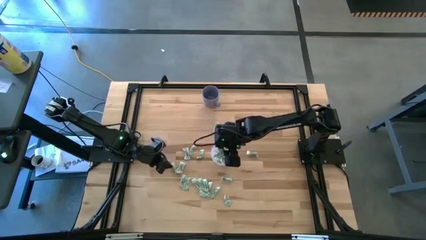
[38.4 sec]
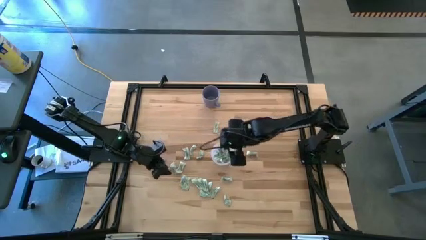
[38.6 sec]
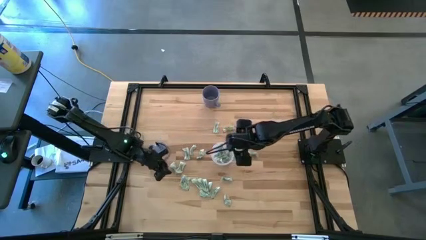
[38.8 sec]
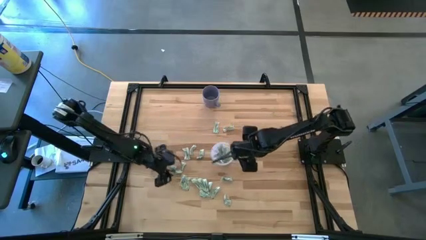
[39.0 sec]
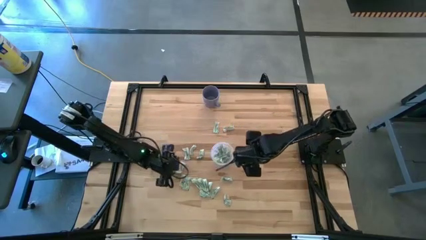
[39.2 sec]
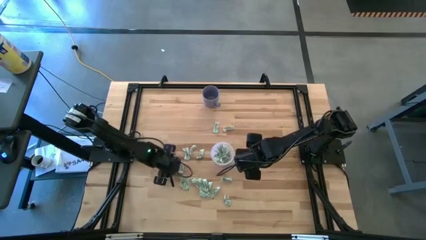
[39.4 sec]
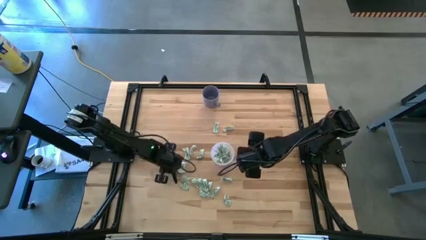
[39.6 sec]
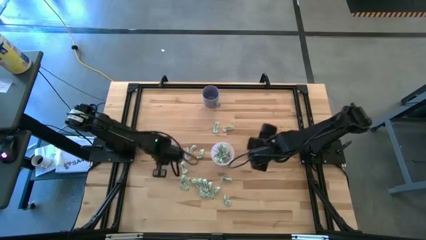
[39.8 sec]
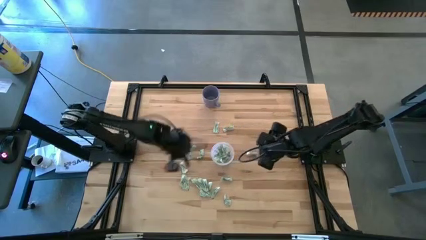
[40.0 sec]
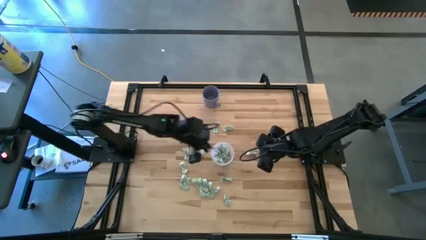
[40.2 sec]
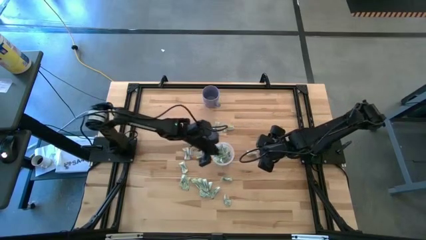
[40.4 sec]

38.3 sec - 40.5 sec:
Task: Pick and place Stevia / Truvia into bins
Put the stevia packet into the transparent container

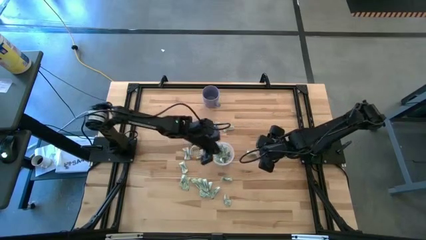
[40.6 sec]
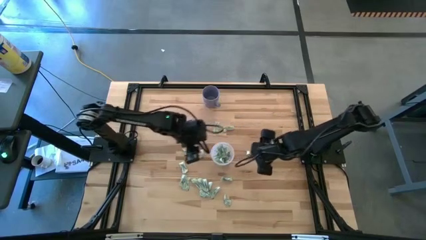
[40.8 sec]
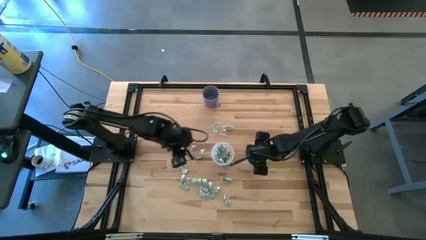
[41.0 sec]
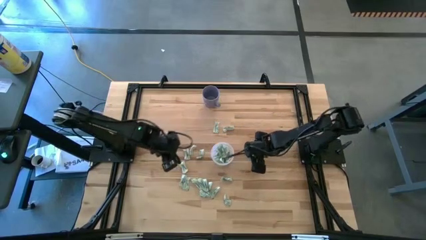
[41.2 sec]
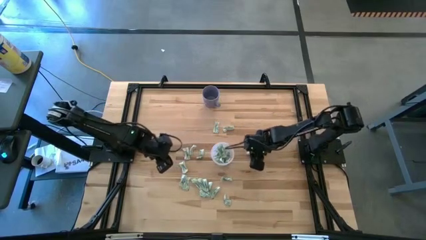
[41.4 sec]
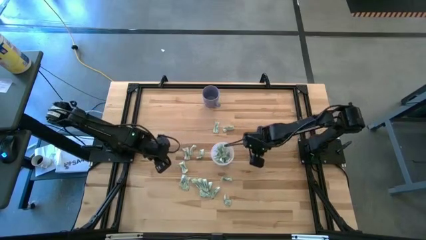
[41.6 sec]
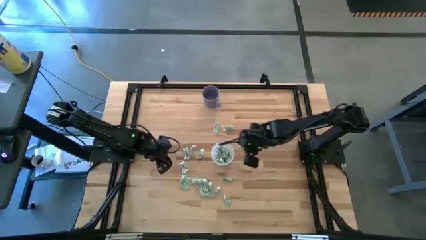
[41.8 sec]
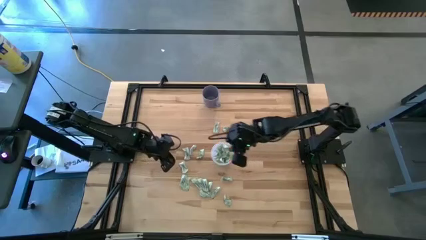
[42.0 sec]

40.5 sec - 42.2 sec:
Put the stevia packet into the transparent container

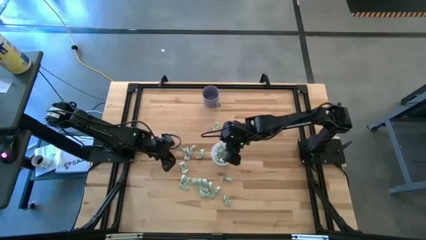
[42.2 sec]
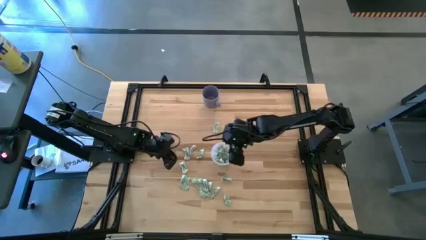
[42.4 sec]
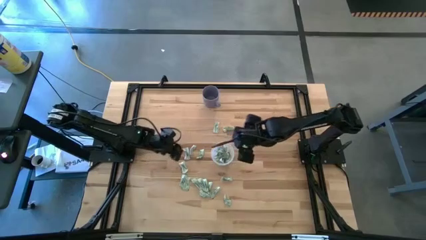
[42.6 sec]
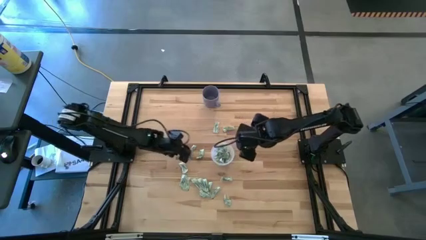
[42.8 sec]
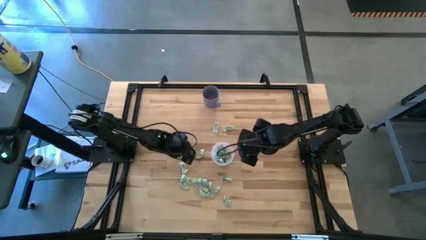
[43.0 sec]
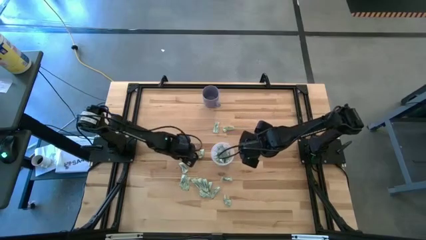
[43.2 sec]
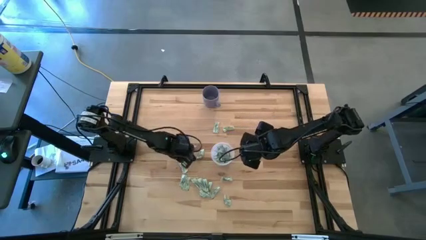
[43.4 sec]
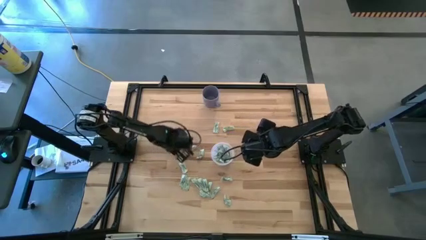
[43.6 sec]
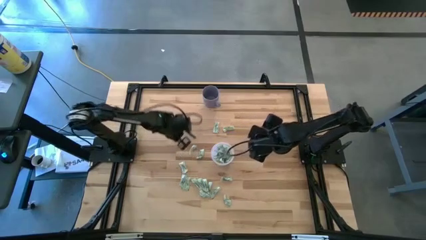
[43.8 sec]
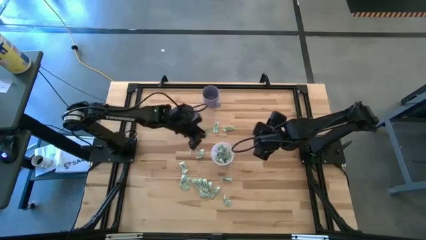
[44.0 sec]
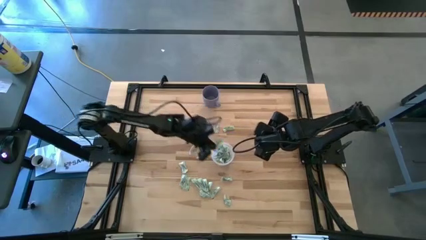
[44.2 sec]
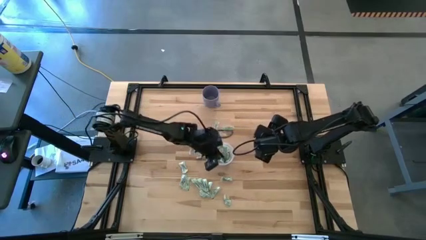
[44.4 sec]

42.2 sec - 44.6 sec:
Put the stevia packet into the transparent container

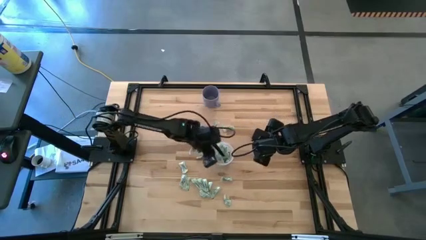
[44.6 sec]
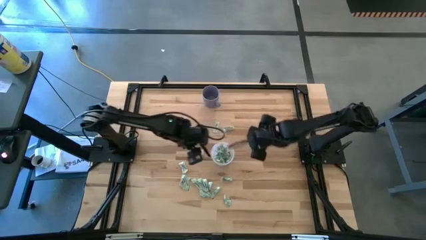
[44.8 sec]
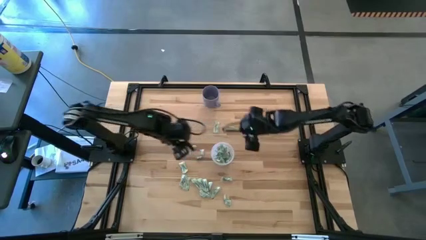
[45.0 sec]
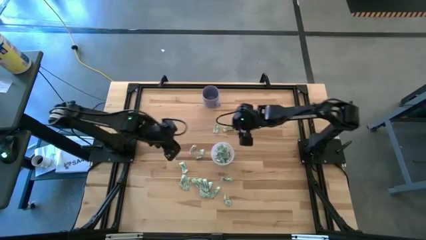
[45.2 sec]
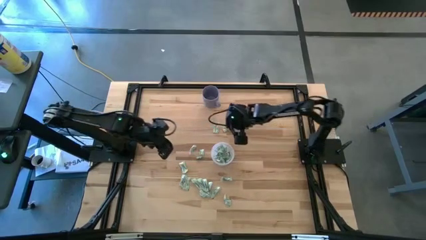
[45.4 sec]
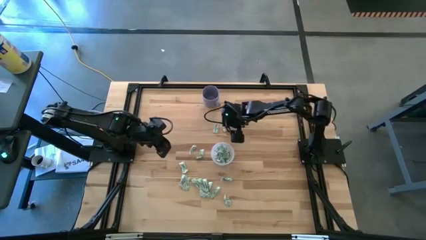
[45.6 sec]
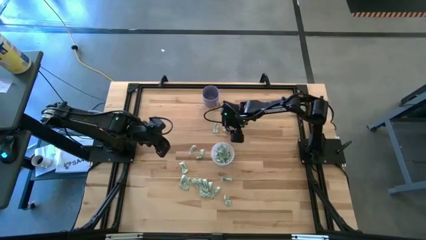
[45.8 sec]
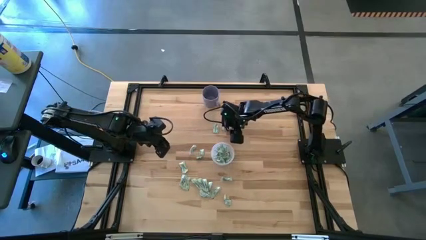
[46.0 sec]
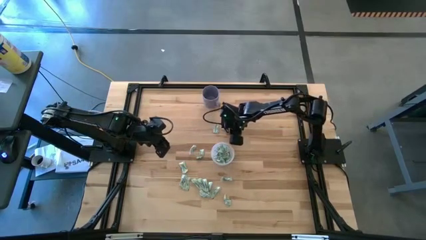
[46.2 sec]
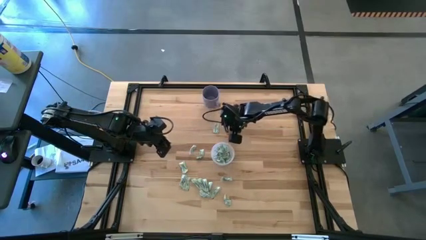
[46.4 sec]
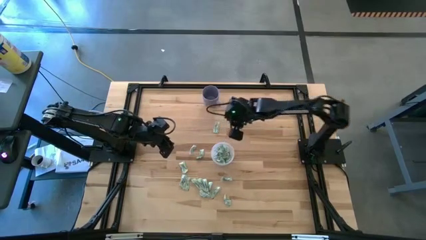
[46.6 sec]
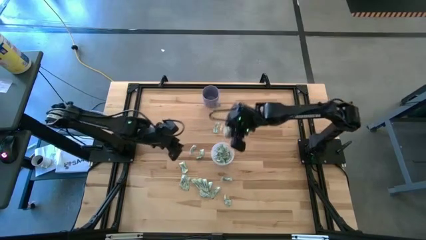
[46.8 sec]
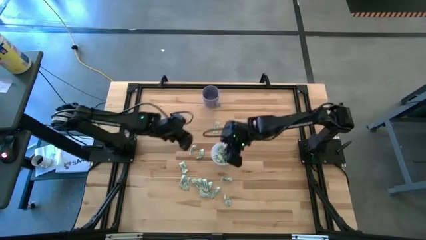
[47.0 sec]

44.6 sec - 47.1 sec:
Put the stevia packet into the transparent container

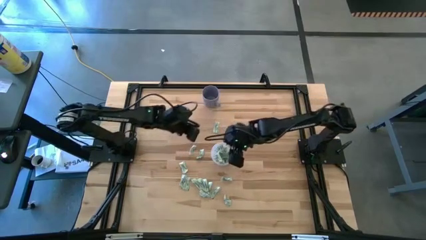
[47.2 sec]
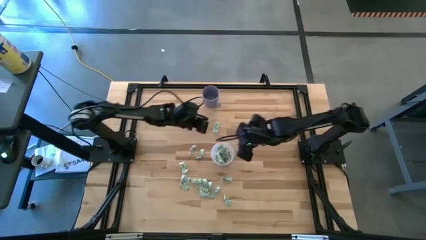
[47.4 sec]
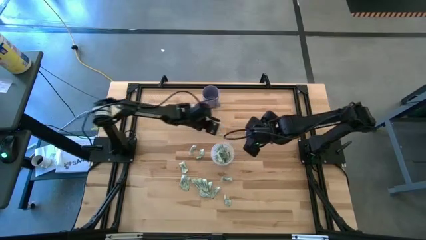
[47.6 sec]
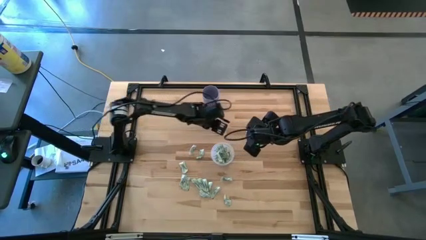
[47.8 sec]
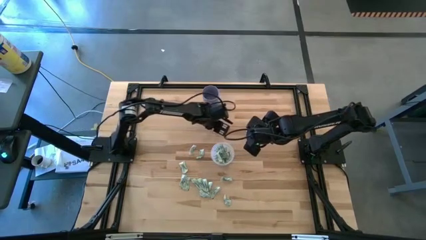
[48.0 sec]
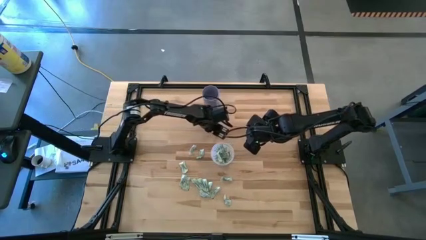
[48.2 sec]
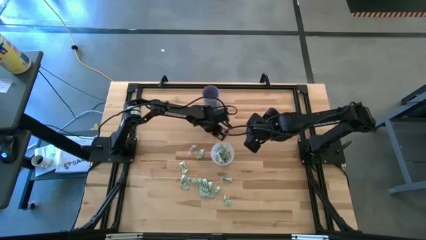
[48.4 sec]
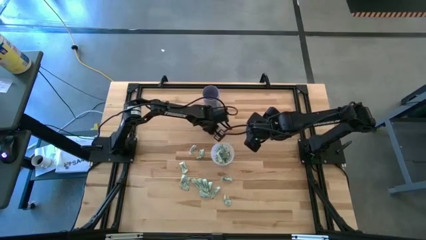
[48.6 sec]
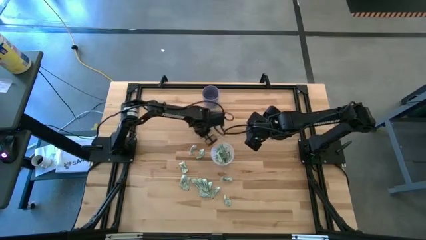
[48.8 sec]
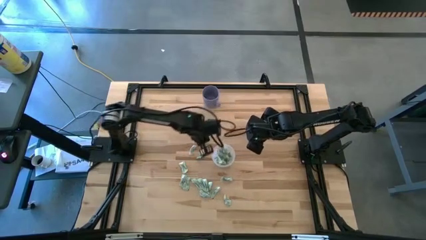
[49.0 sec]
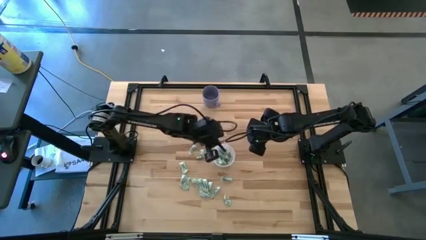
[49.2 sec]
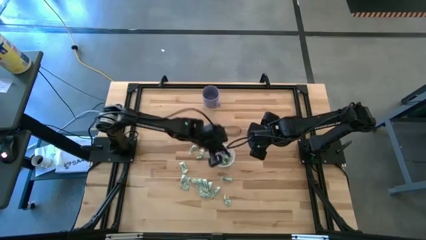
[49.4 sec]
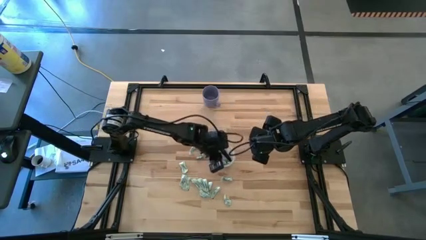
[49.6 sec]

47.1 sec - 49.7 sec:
Put the stevia packet into the transparent container

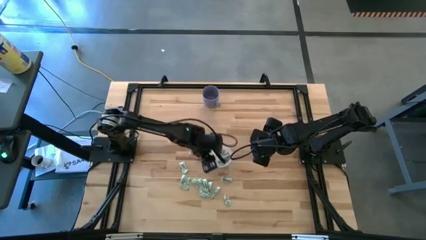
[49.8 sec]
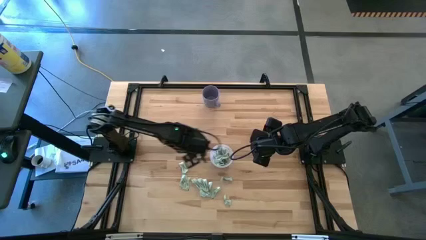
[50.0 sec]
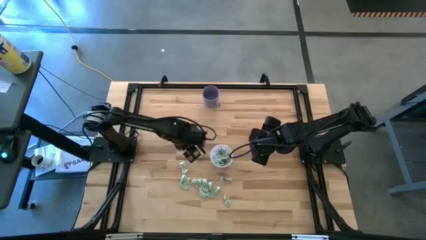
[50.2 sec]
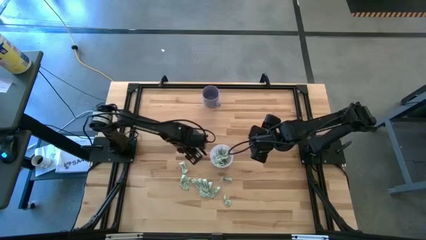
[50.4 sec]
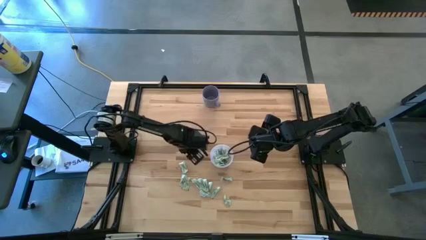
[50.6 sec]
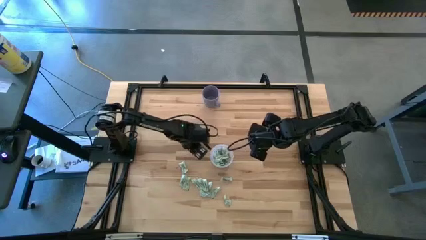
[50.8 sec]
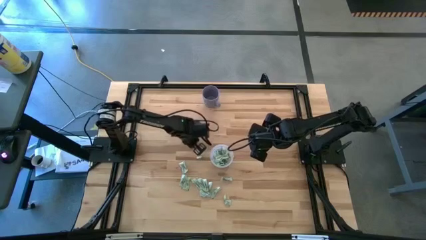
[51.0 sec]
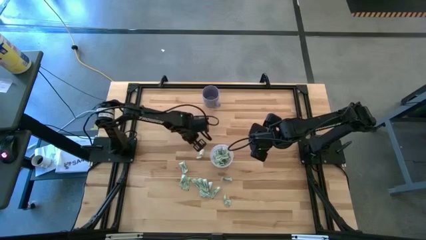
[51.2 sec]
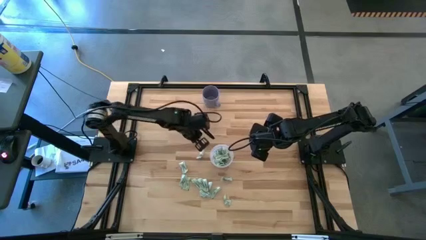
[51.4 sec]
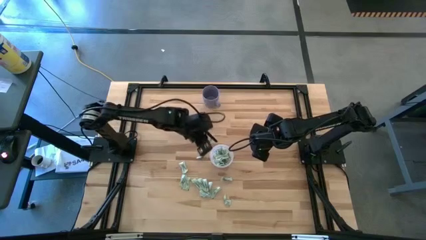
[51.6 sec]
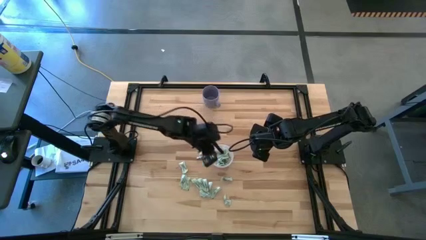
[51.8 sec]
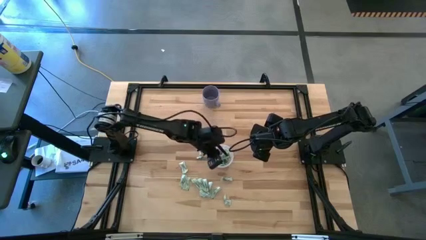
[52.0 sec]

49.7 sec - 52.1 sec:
Put the stevia packet into the transparent container

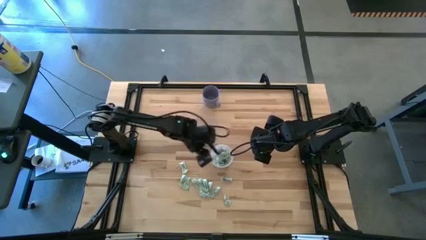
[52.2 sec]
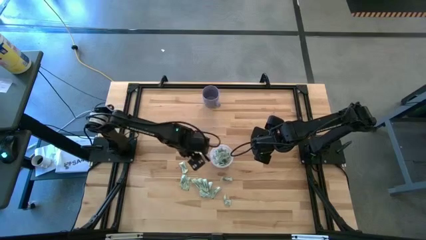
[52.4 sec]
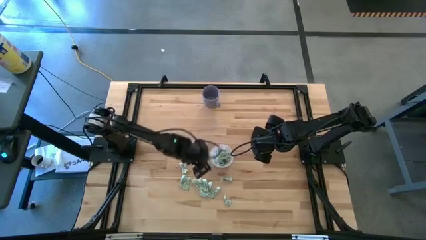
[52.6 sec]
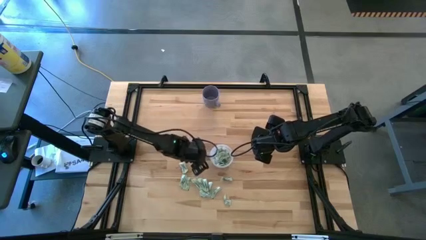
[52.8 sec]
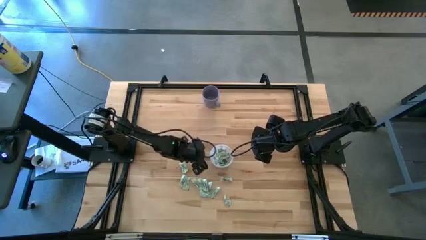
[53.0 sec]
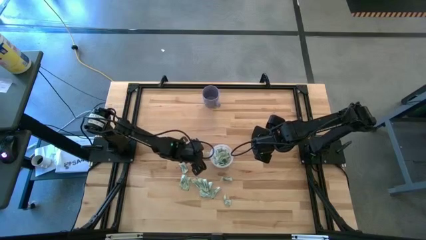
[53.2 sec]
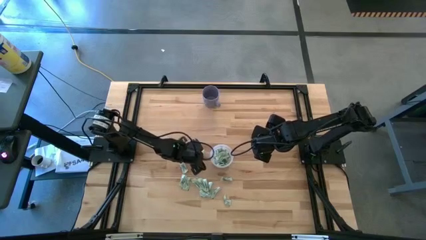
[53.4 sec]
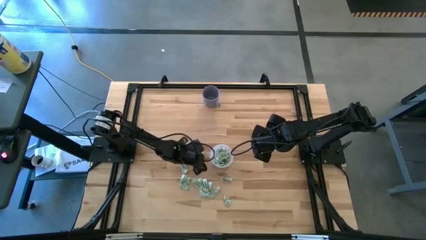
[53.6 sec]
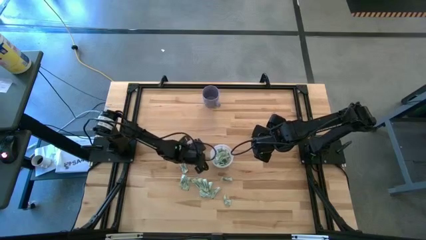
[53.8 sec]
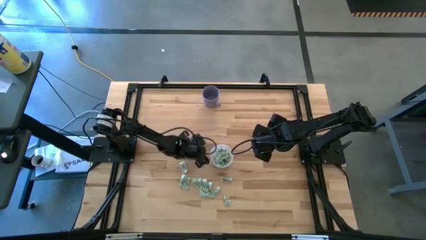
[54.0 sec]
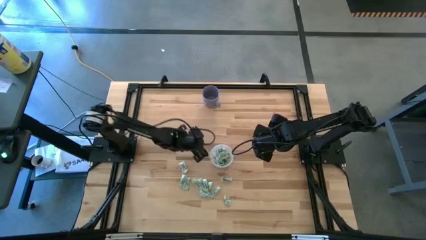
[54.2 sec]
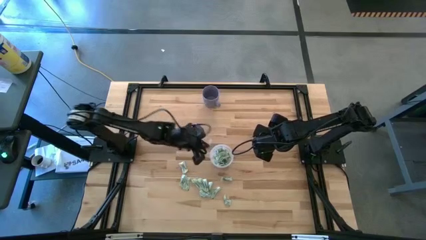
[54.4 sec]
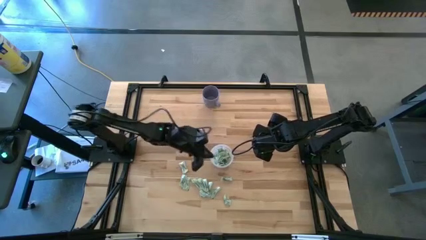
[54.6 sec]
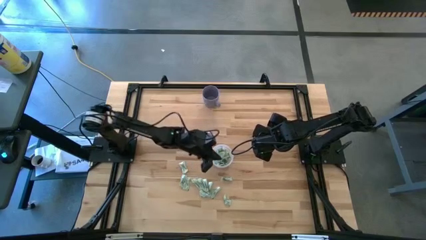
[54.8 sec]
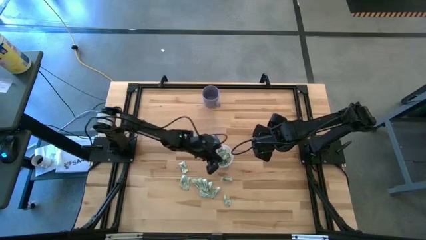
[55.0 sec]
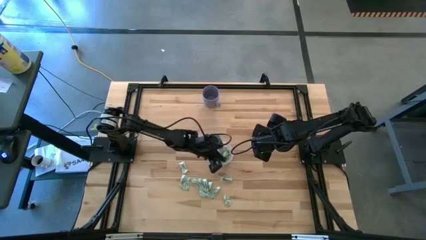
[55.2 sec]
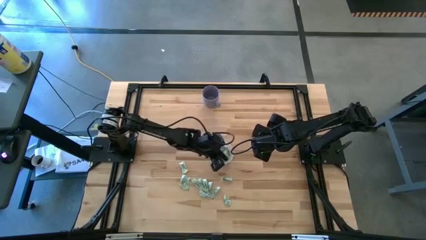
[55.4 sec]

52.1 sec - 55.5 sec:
Put the stevia packet into the transparent container
